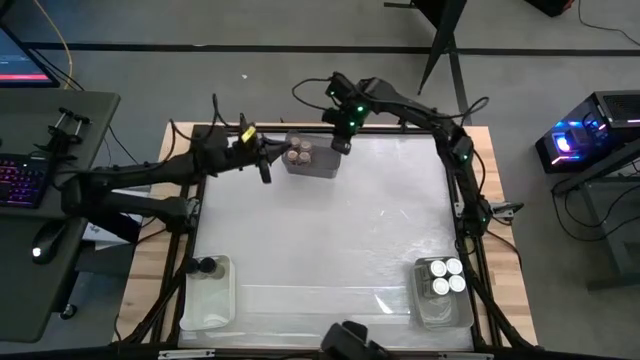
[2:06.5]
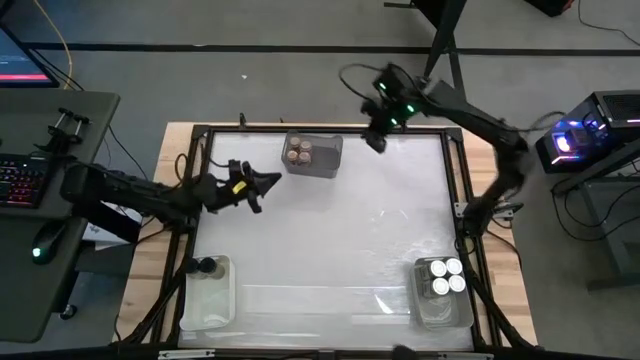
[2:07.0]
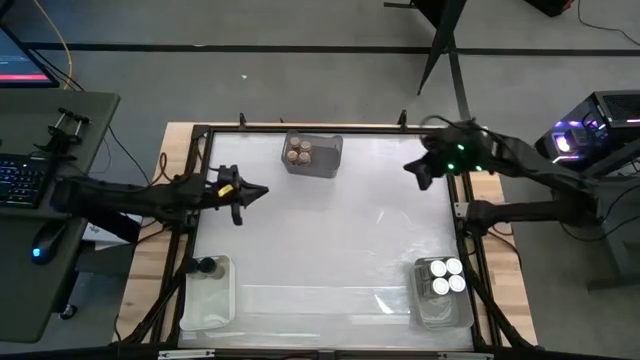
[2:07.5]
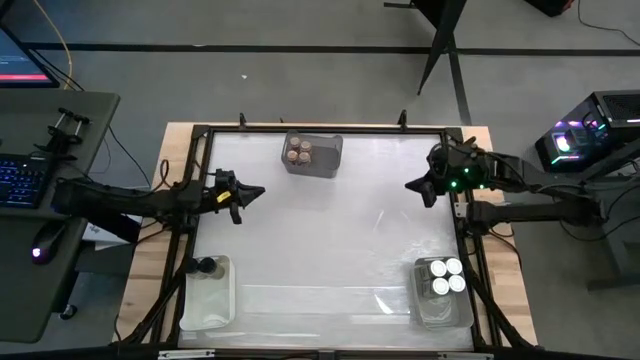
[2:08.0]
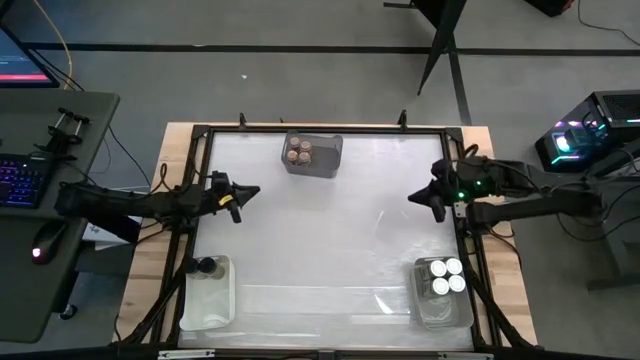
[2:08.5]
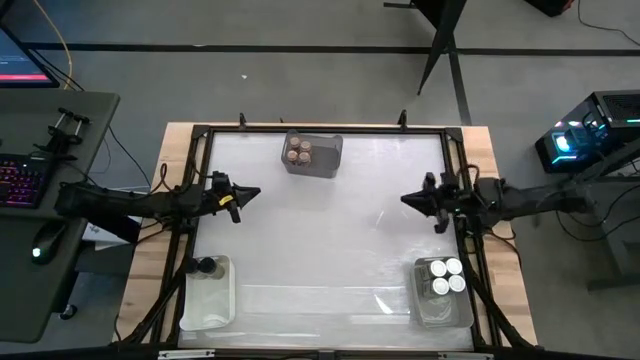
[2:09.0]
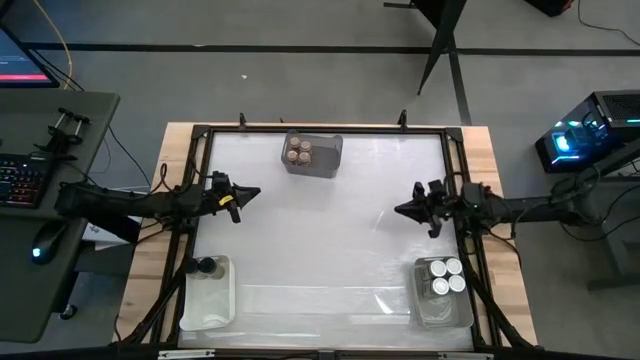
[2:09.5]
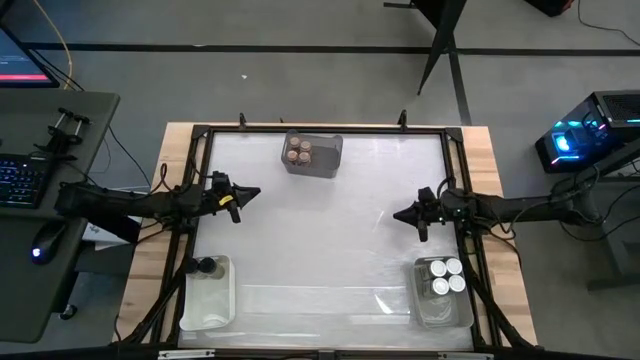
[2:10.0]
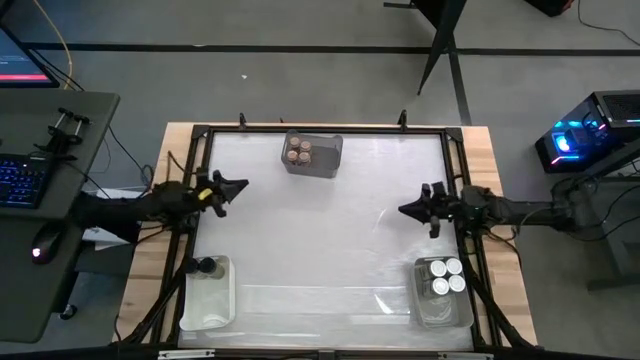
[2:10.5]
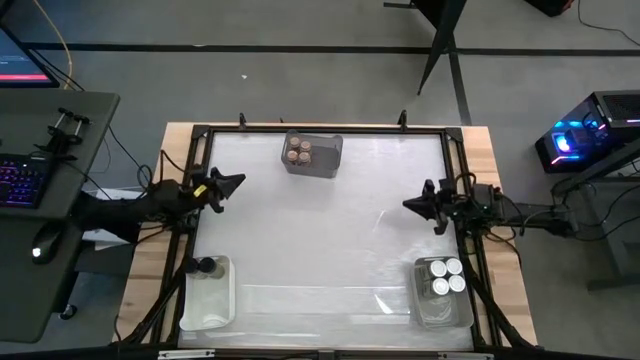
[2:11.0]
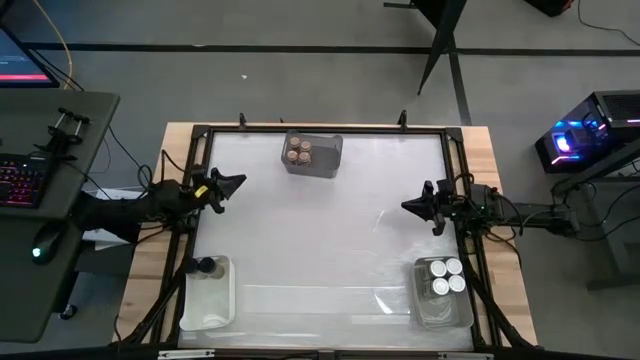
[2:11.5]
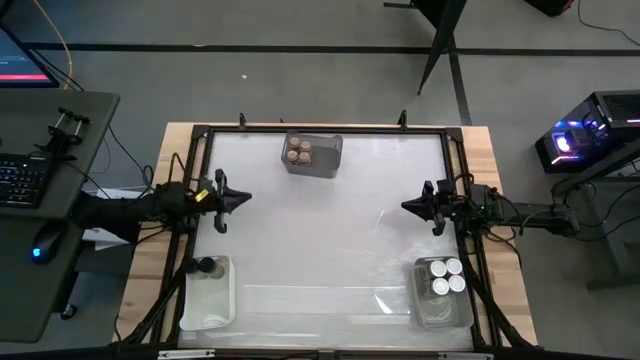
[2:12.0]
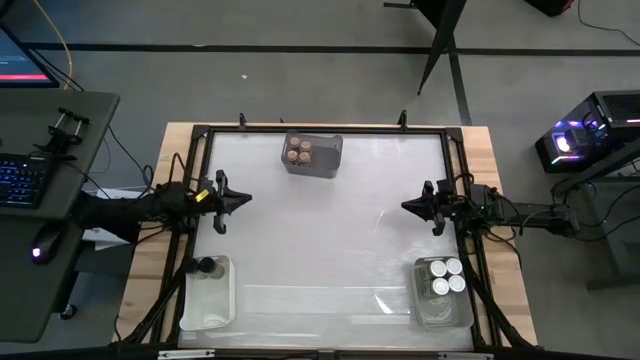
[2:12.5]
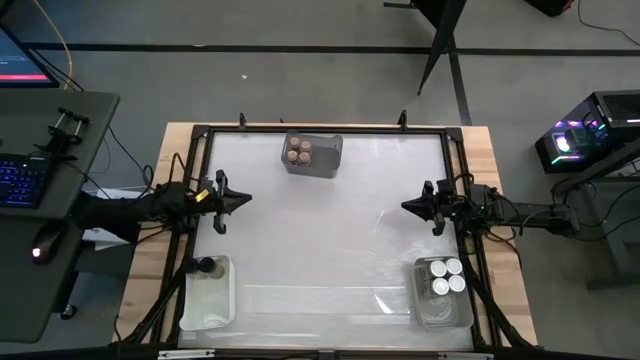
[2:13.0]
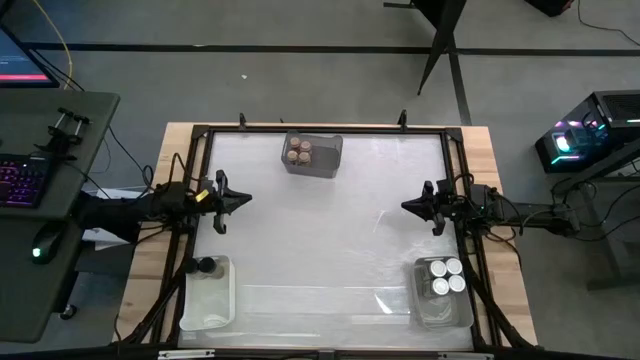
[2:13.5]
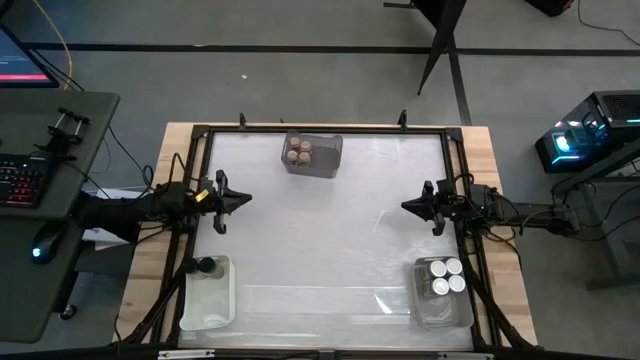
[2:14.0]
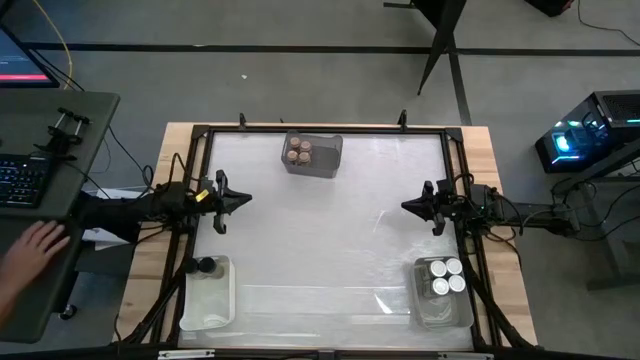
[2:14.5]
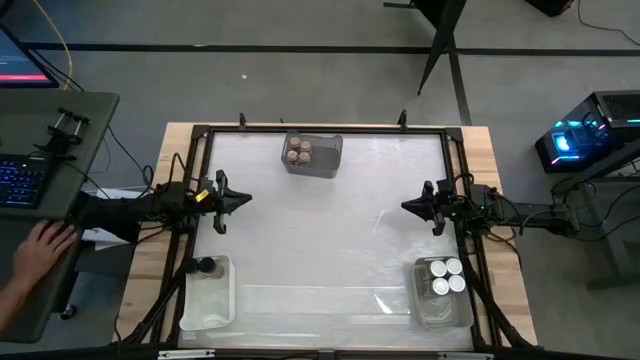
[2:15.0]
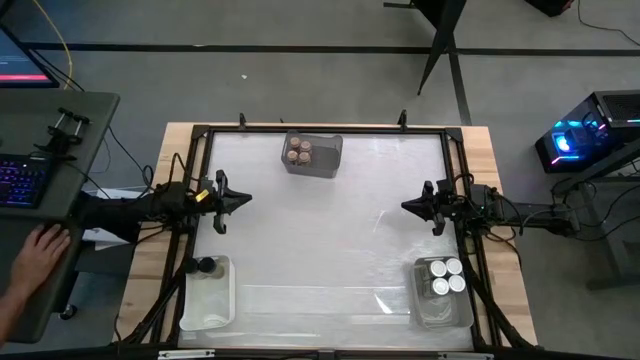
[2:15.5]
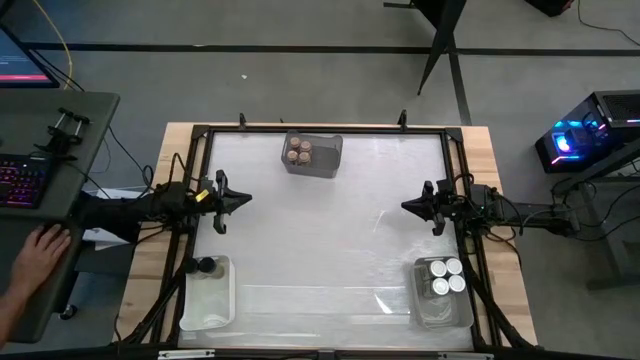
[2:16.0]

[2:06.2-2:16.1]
Task: Sort spices by type
Return to Home Position

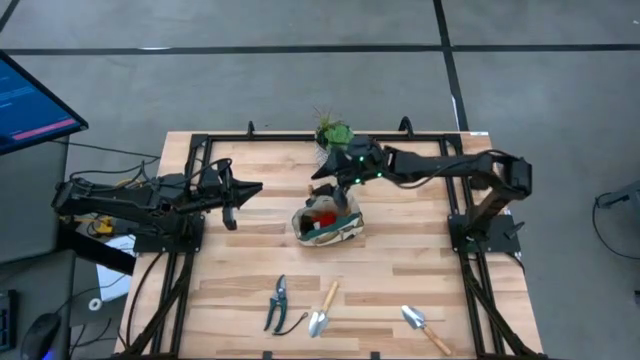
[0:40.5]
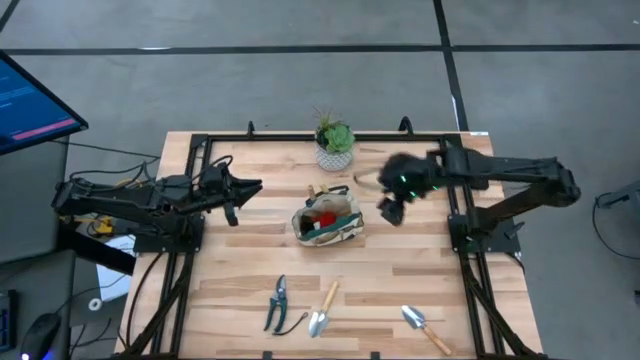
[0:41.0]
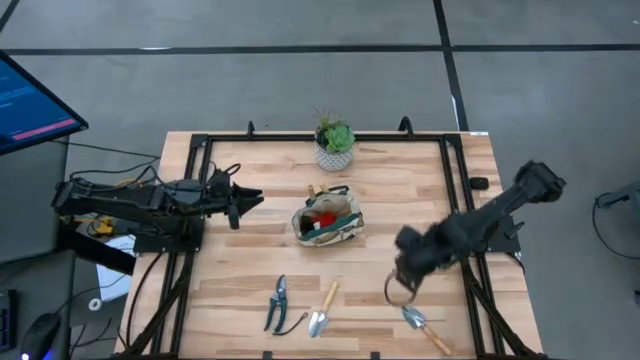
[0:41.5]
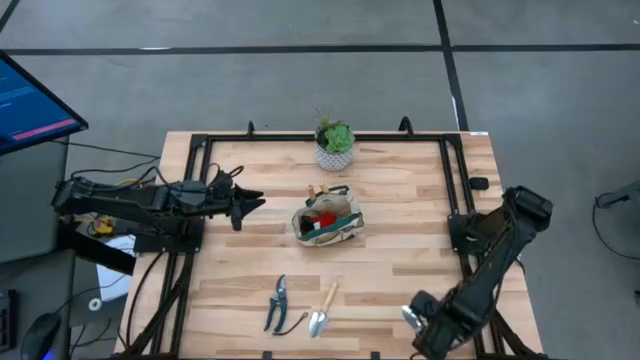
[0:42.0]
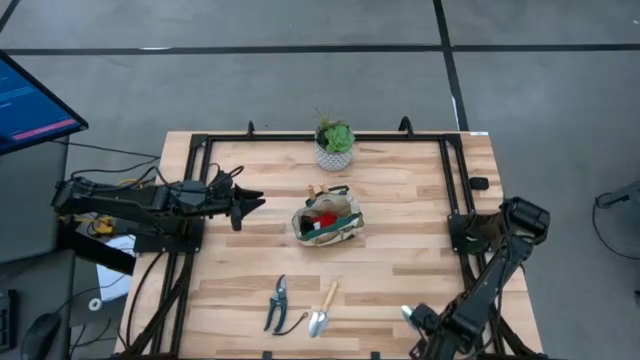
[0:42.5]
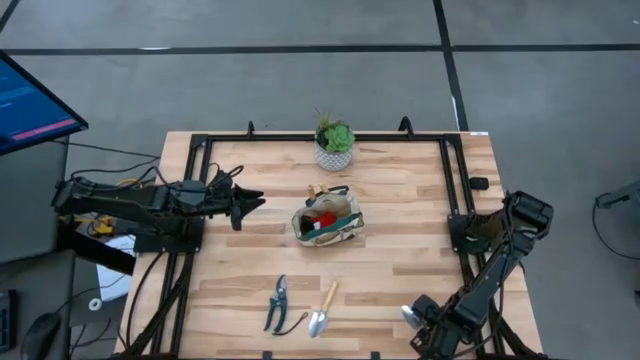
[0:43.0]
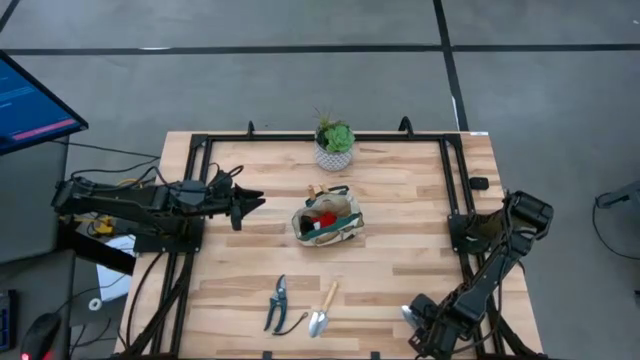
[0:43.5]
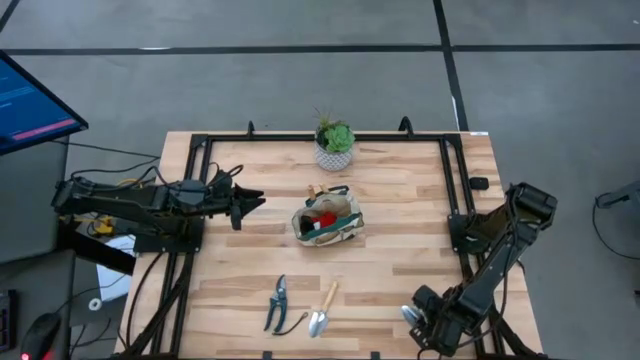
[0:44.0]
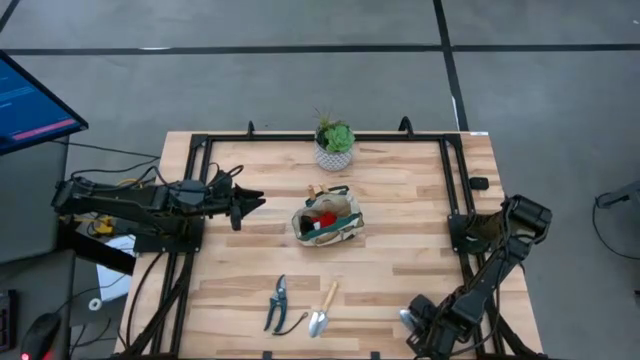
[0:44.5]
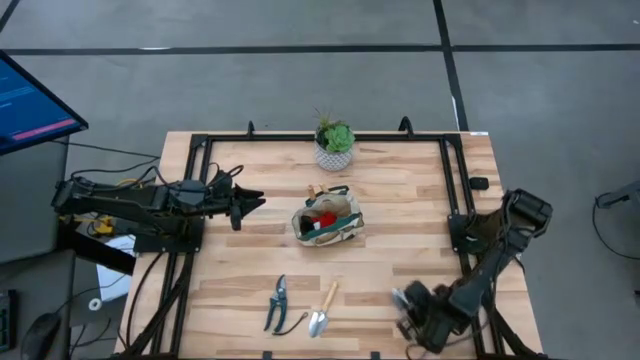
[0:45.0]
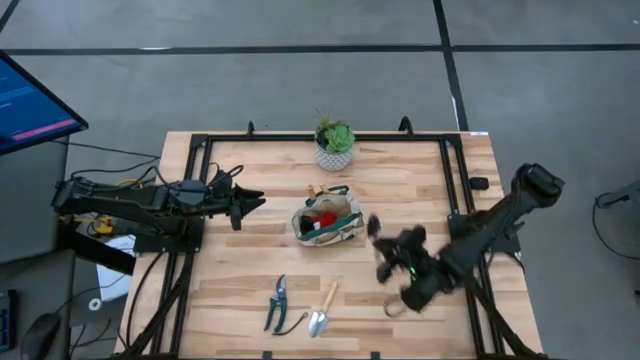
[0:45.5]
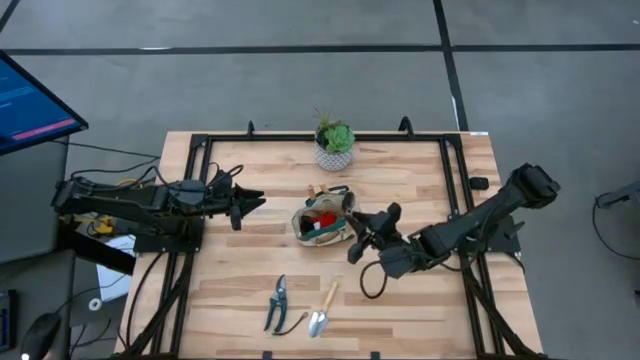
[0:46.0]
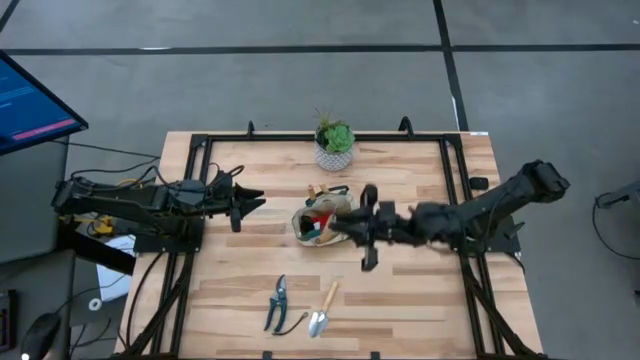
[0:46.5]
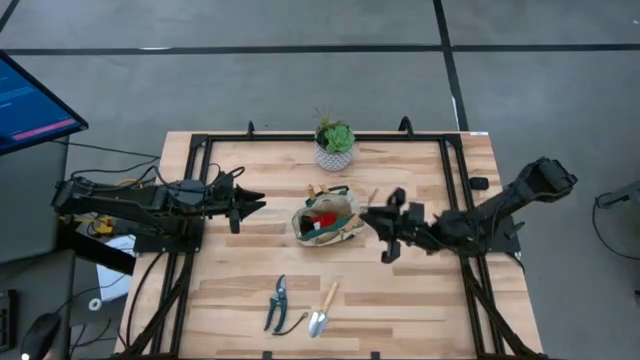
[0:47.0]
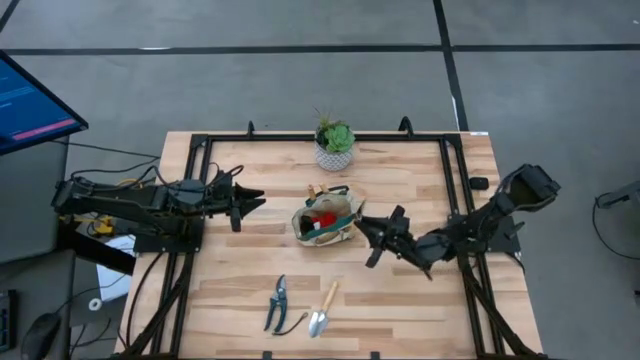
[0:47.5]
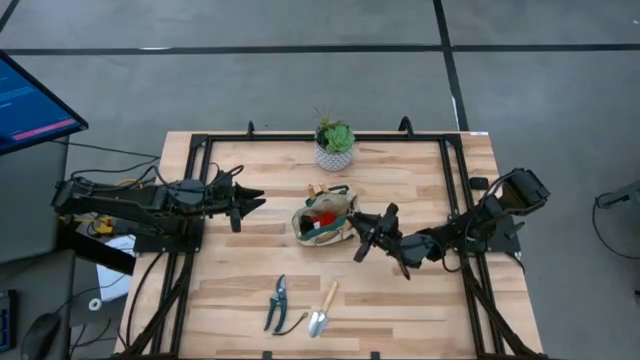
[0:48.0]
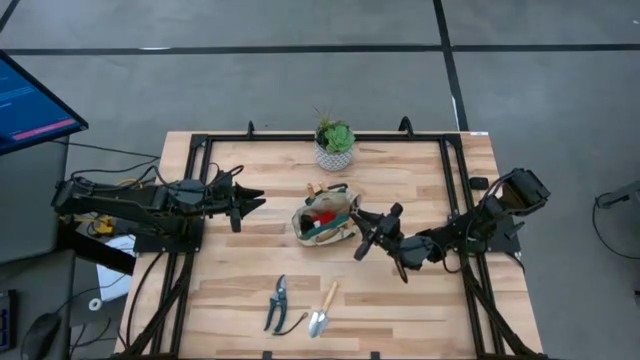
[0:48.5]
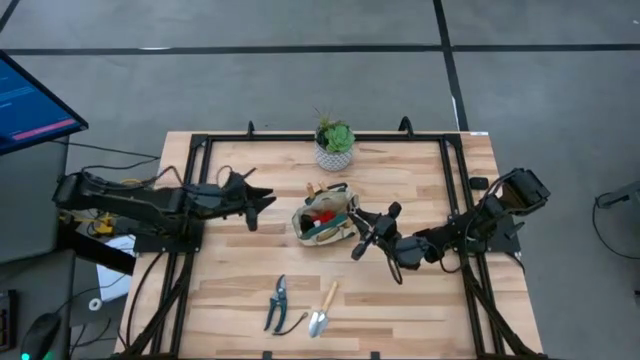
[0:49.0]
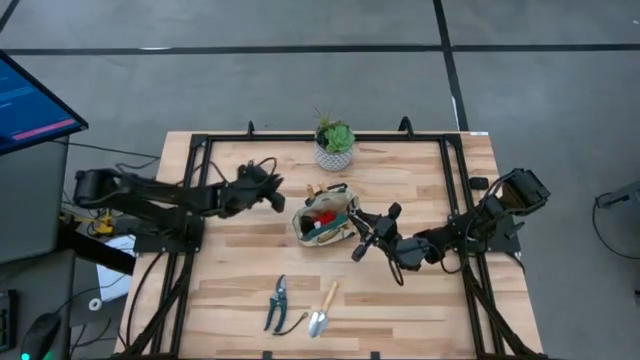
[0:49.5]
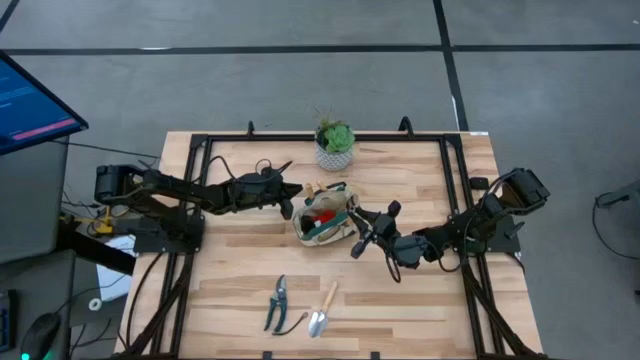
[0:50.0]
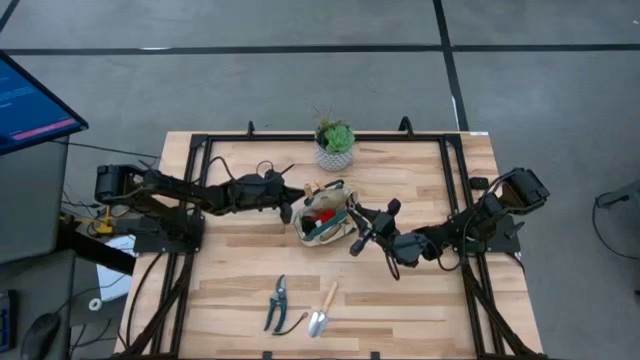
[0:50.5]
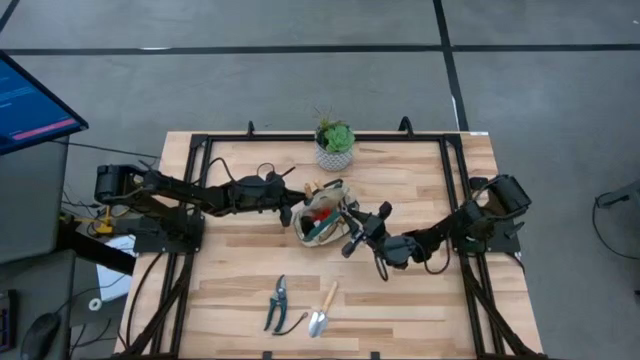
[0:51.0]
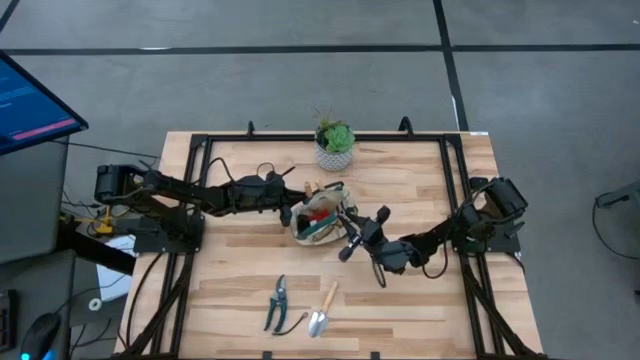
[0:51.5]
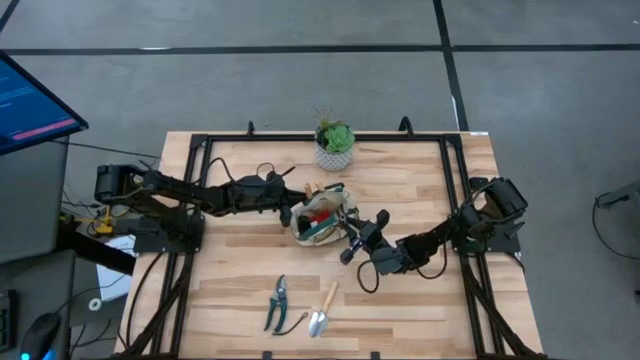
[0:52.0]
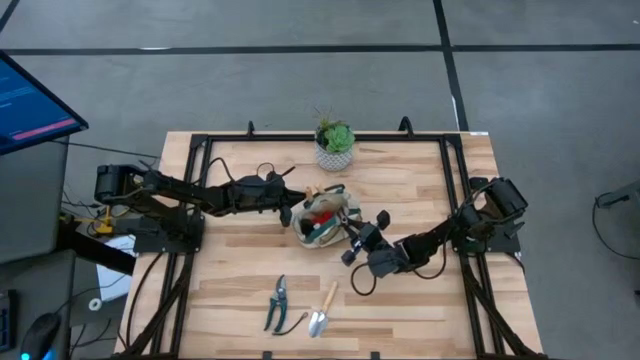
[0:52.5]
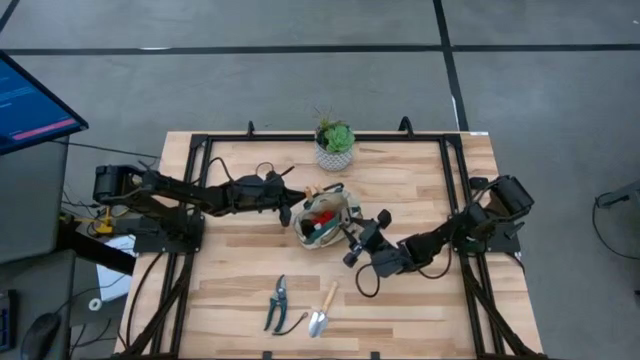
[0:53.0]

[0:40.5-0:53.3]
Task: Pick & Place Garden tools in Gardening bag
Put the trowel into the gardening bag
